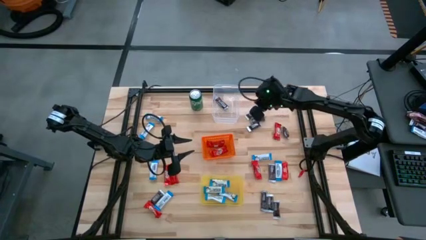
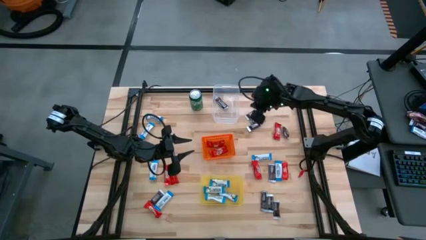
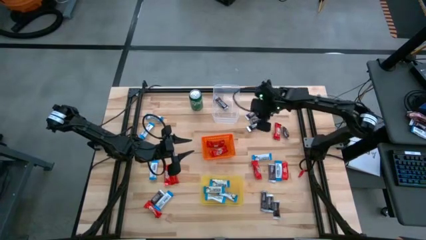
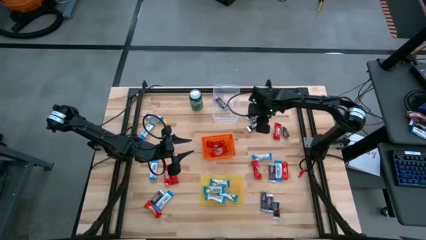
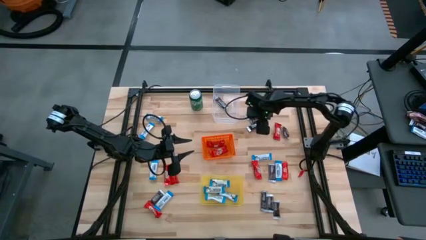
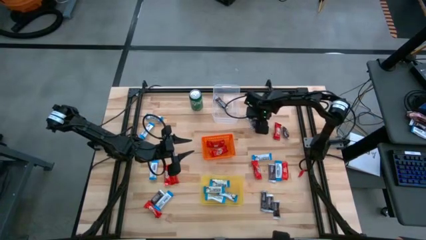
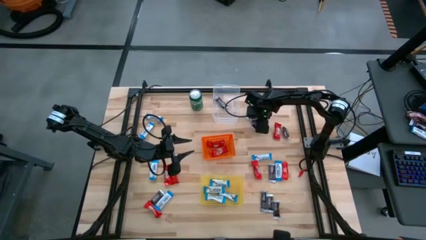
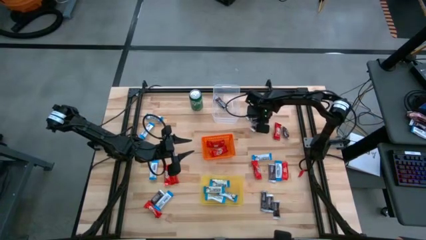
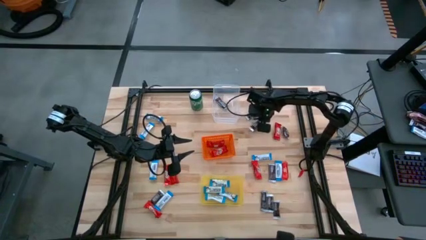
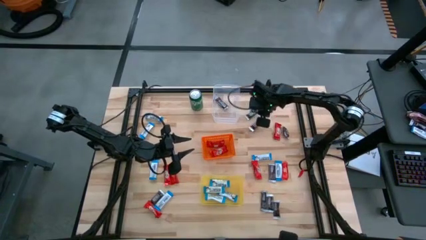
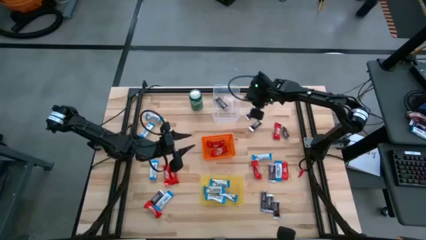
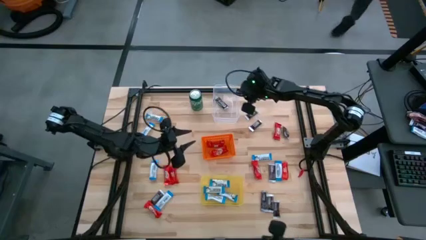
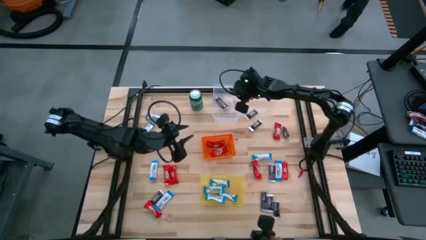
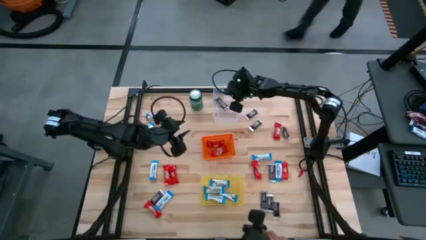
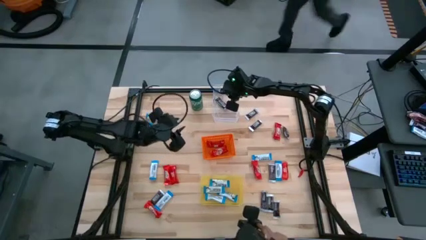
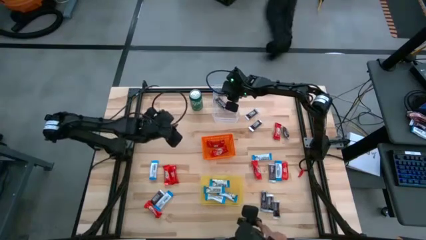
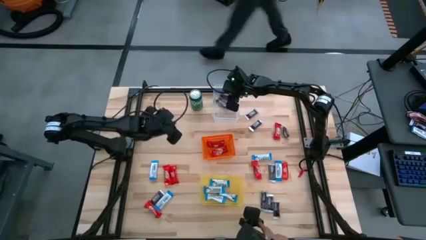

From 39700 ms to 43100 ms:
Task: Sort candy
Put the black candy into the transparent bin

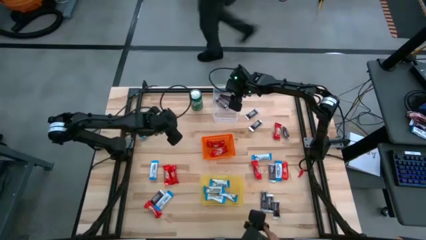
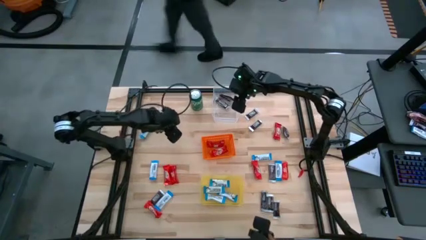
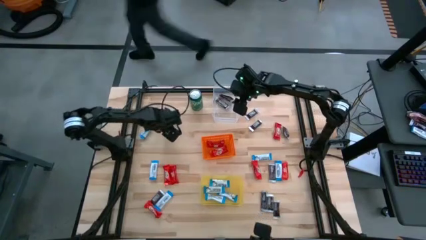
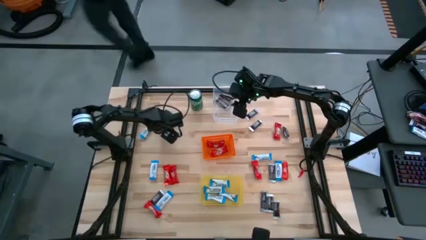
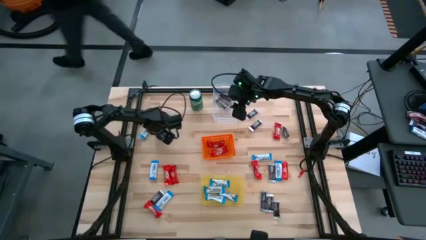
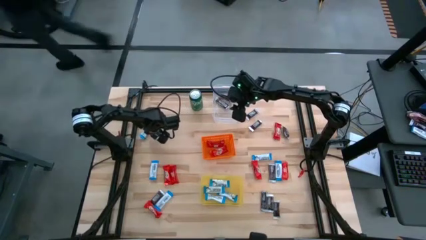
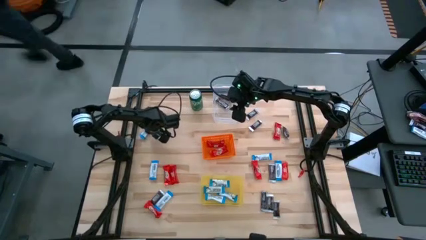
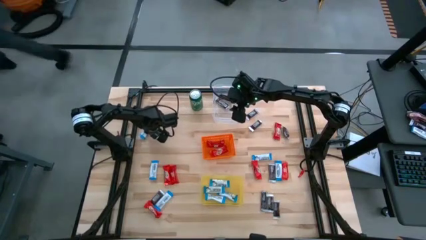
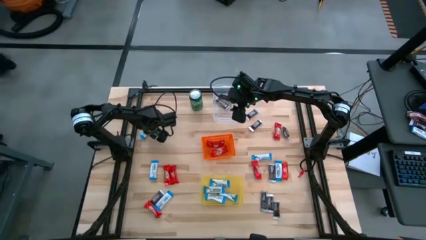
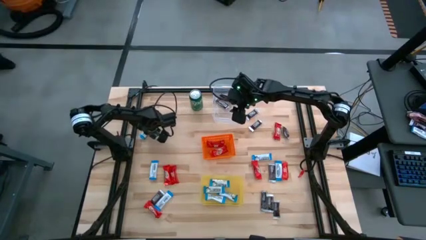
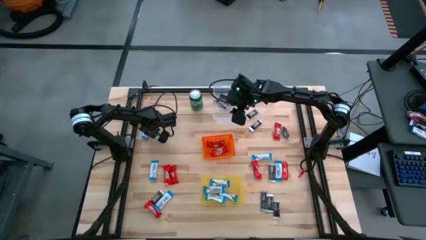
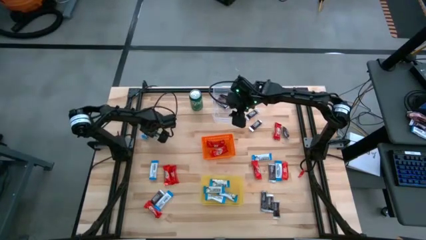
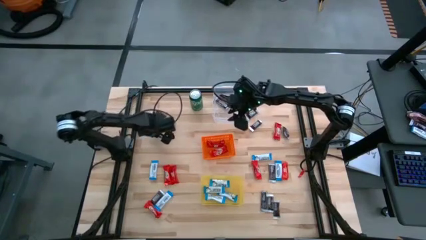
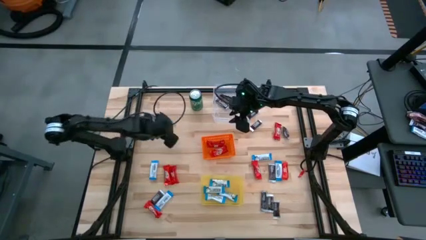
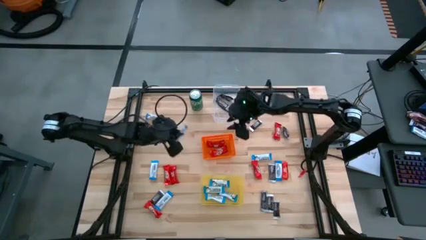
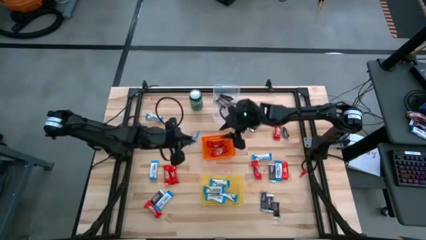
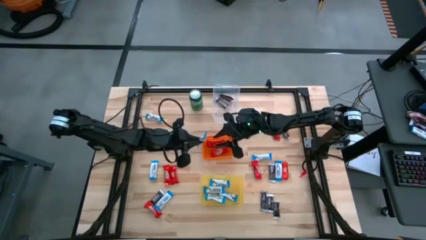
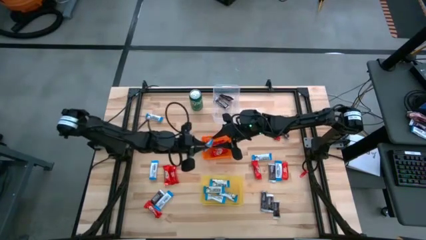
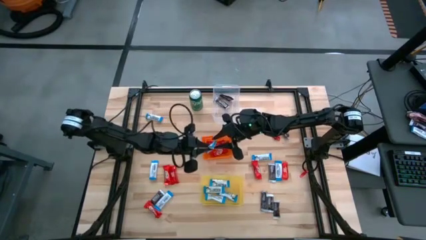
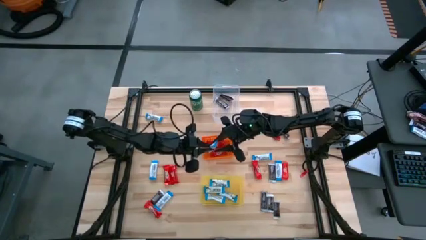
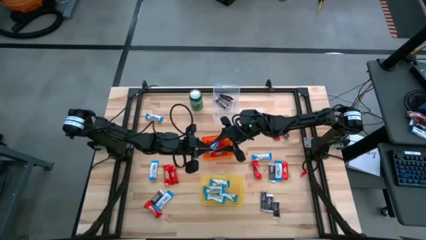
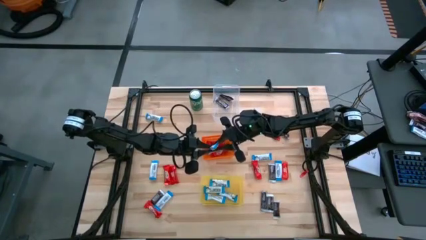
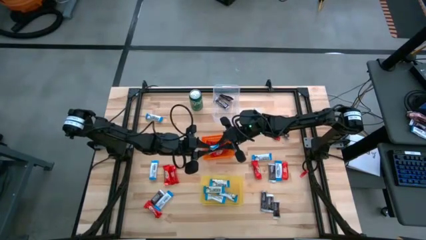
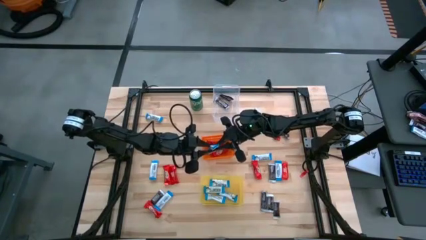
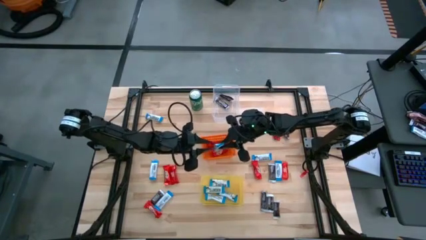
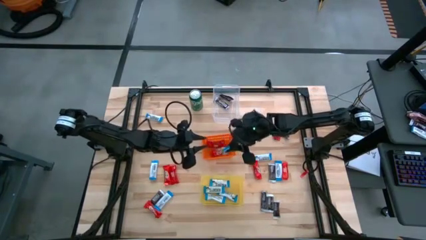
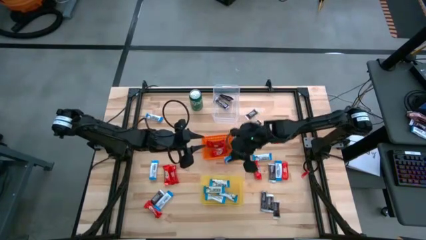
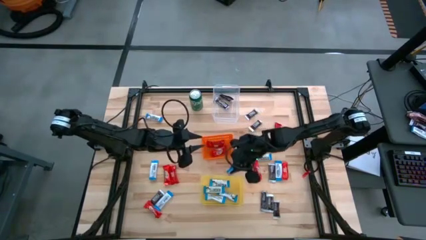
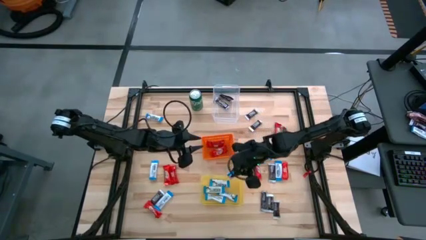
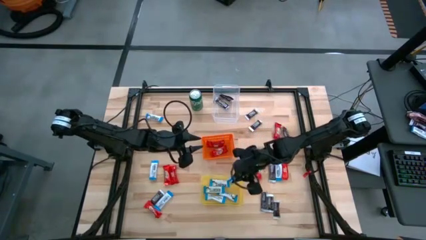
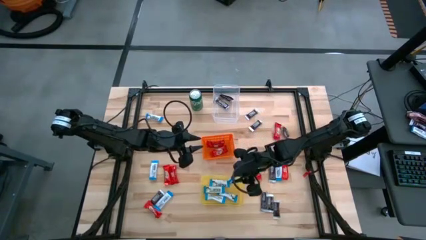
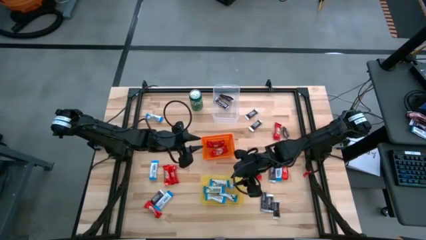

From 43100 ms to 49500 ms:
Put the white candy into the yellow bin

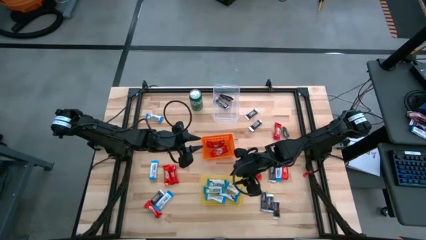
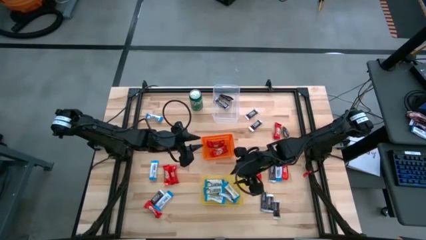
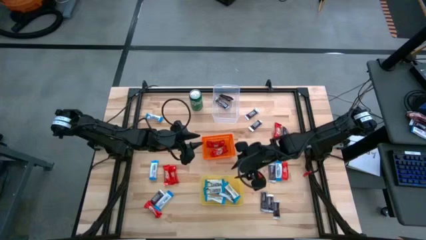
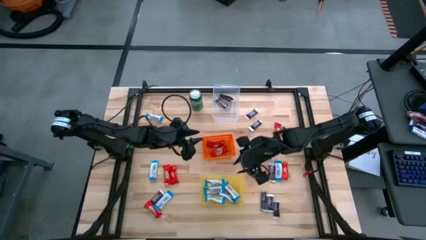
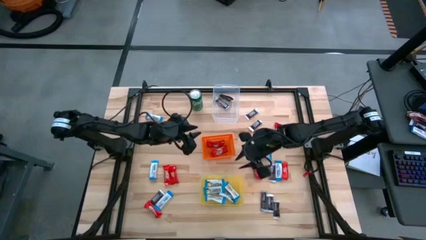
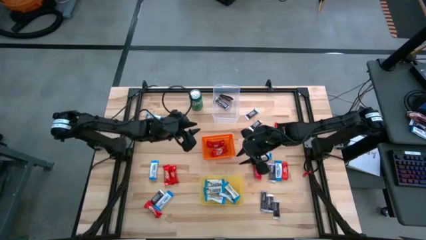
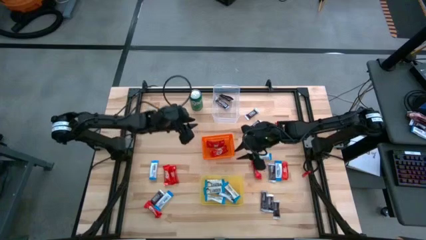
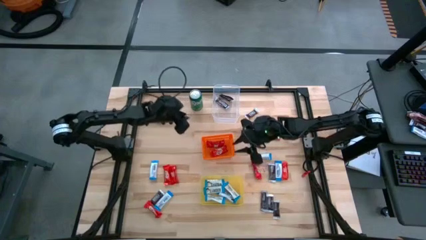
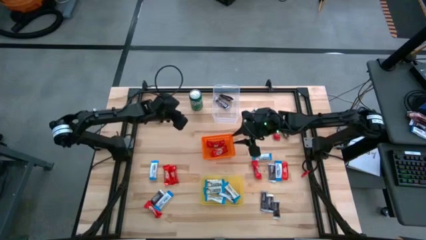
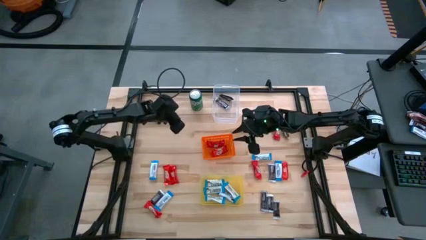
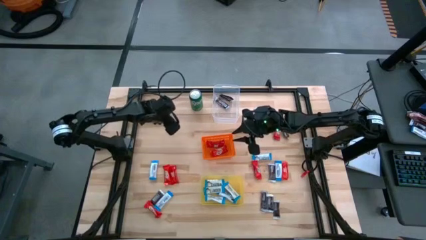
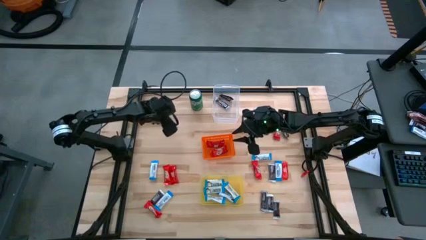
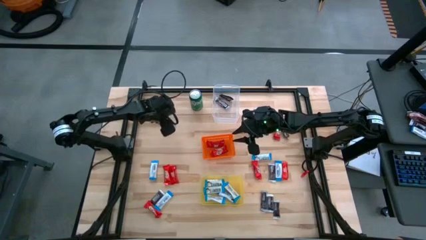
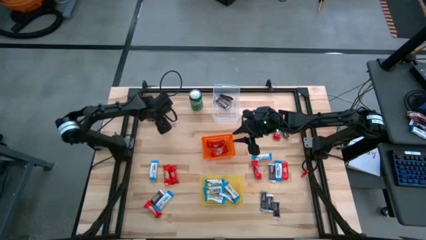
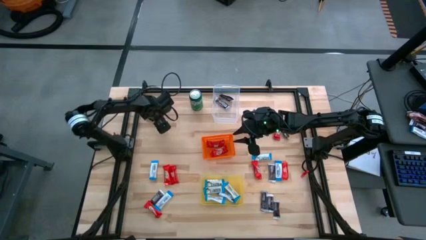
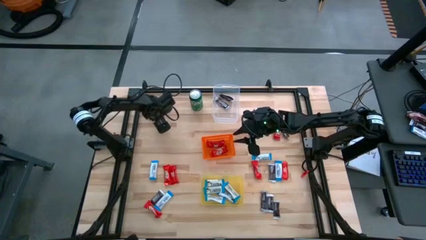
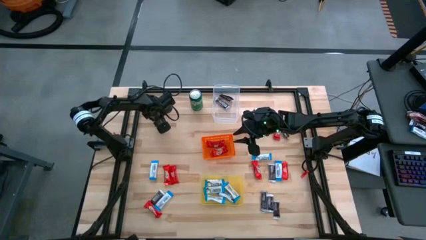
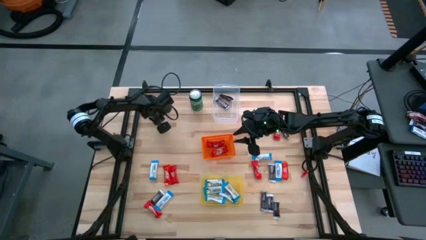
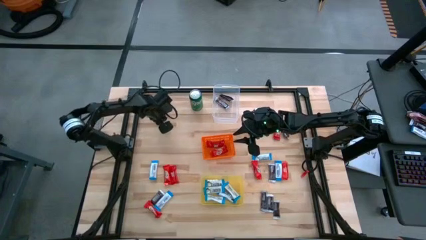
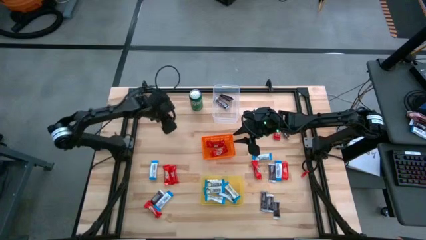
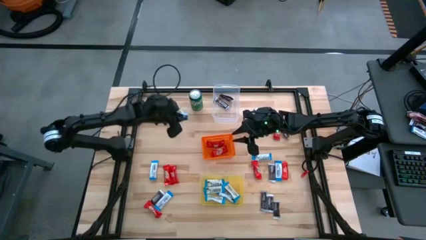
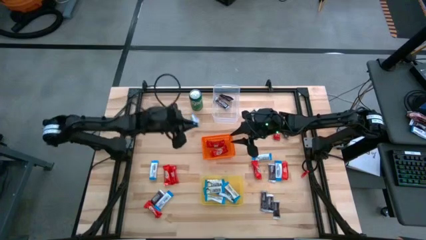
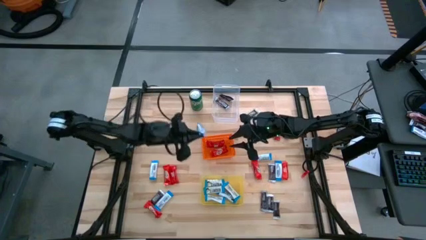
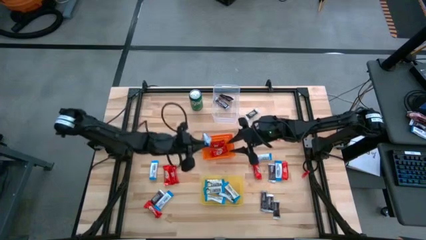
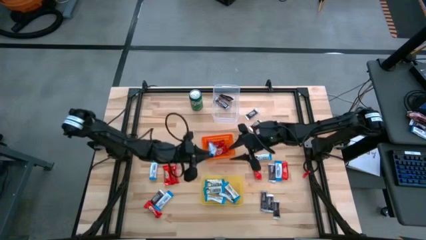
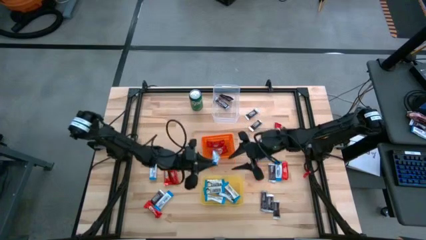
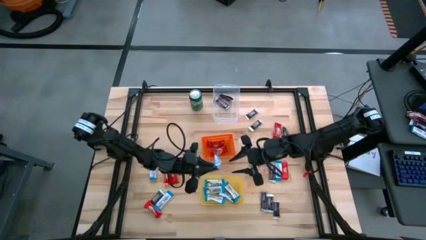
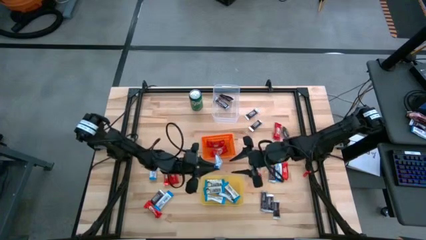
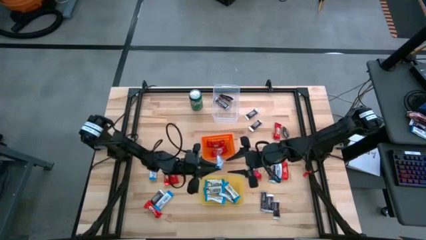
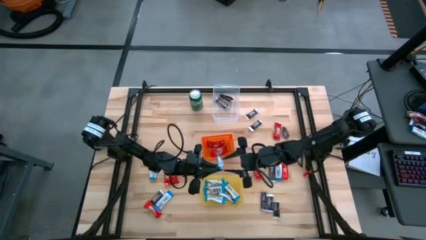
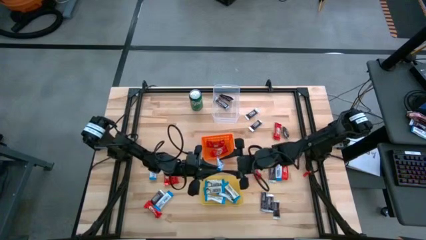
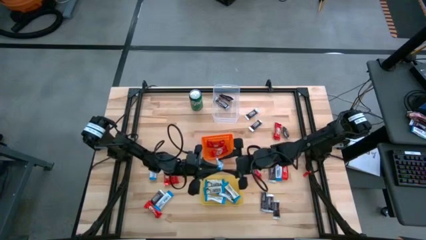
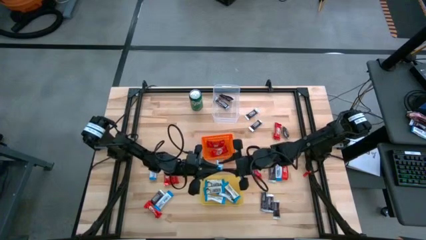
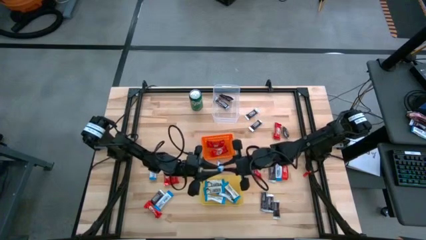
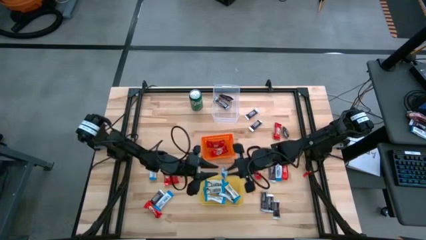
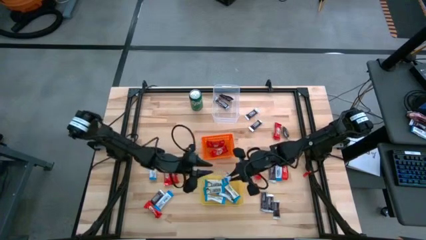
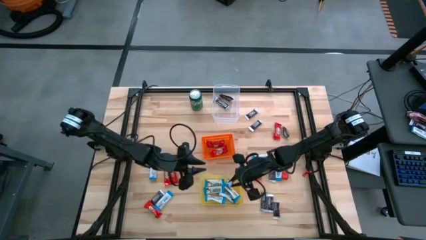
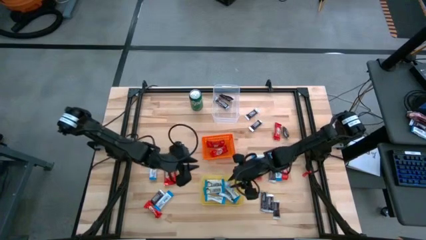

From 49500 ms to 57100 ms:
Put the white candy into the yellow bin
